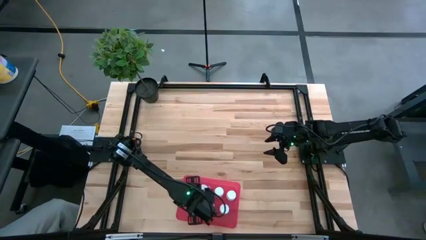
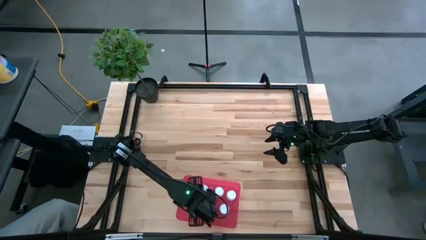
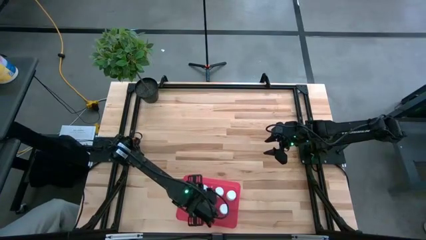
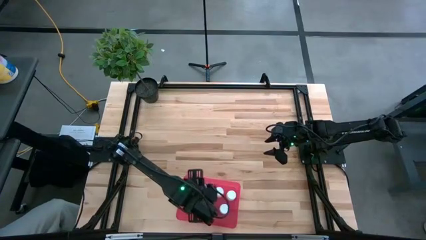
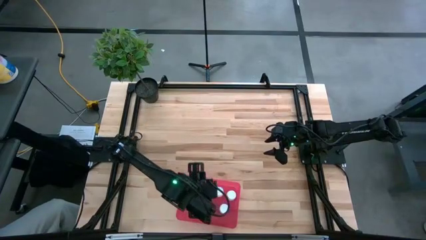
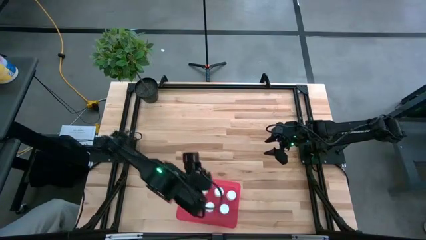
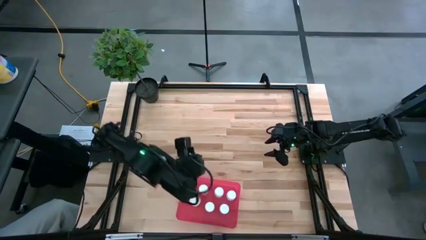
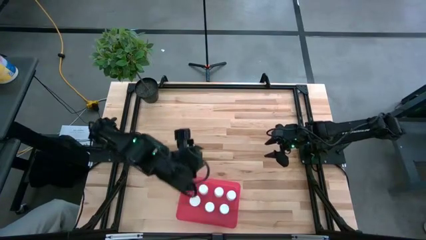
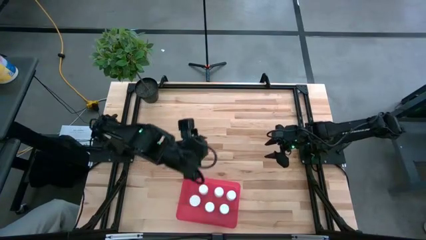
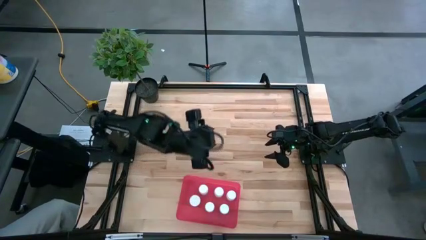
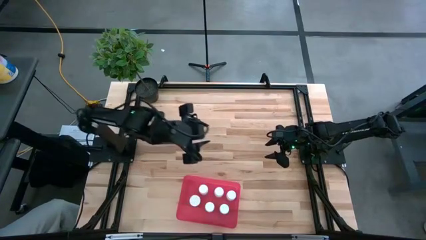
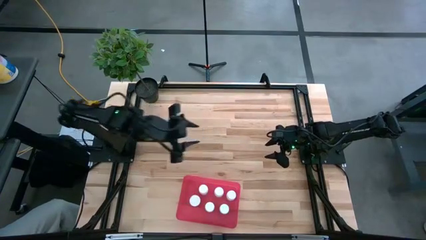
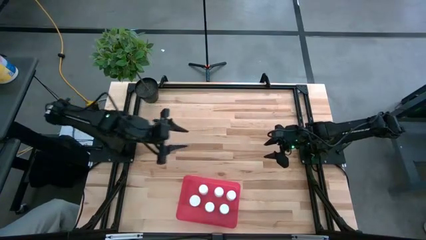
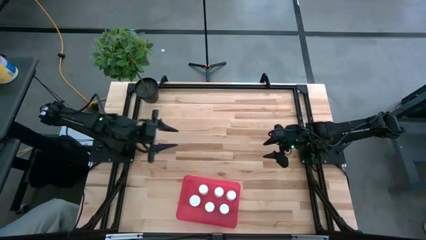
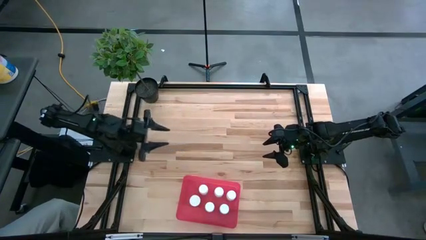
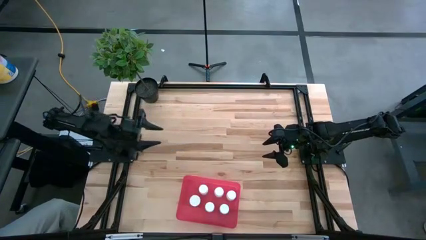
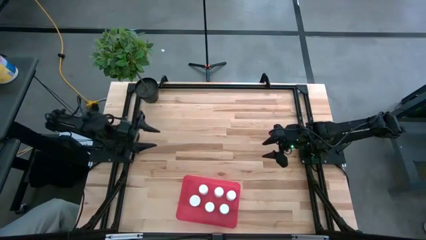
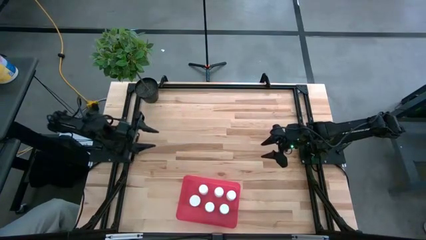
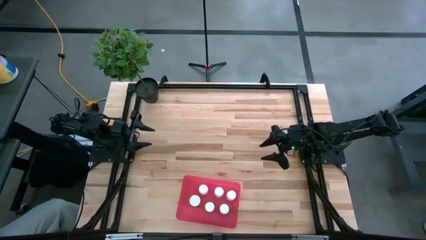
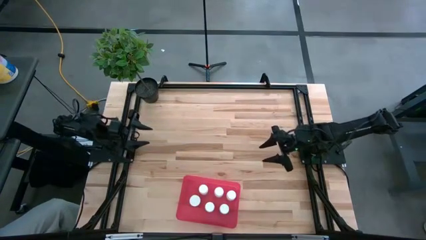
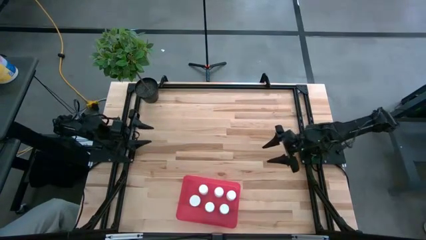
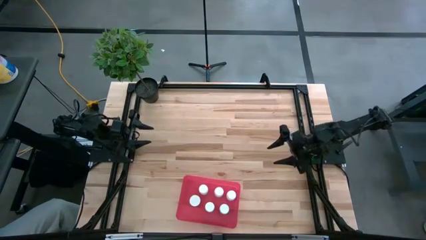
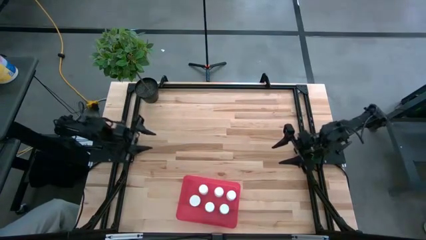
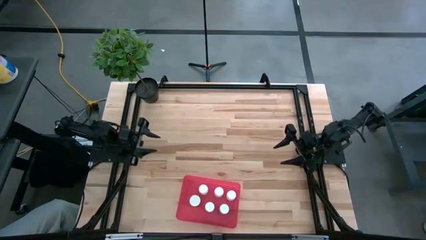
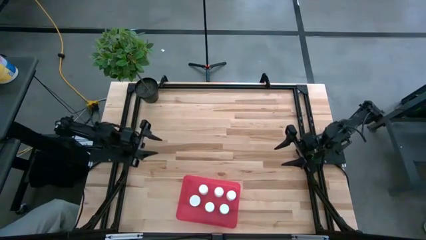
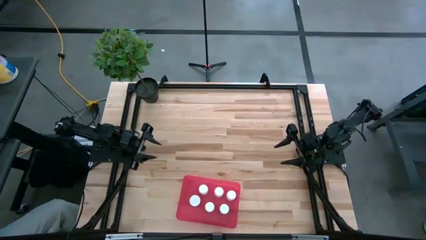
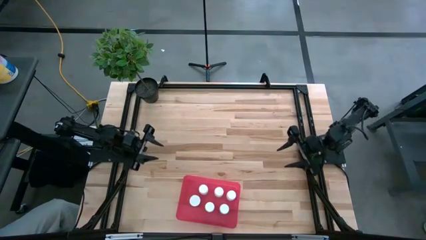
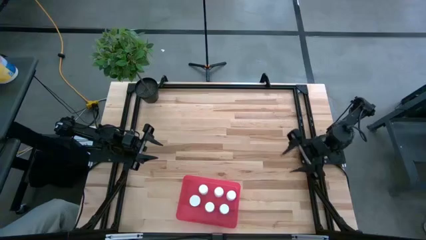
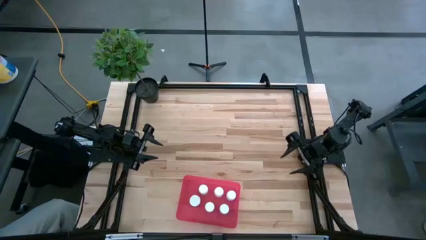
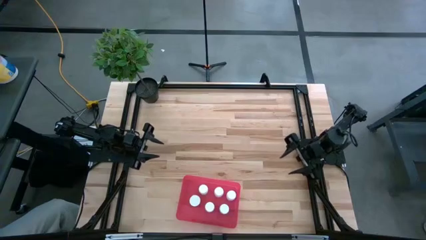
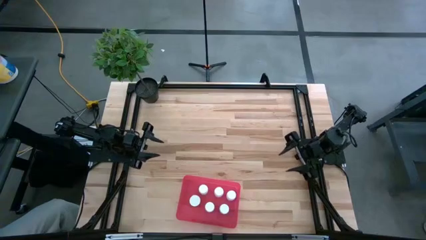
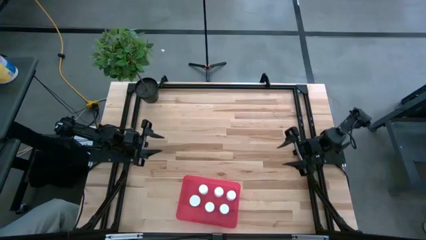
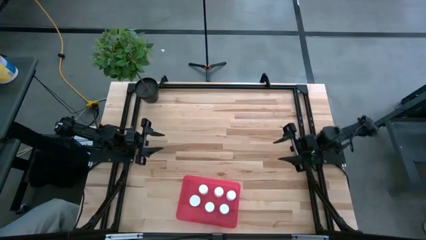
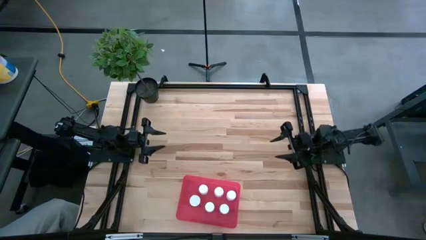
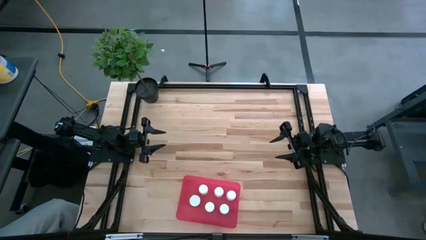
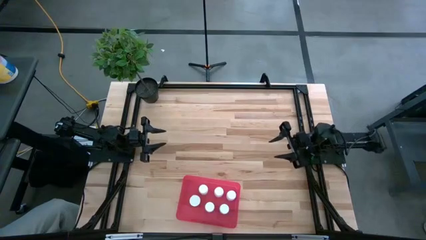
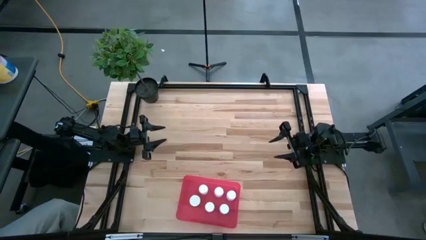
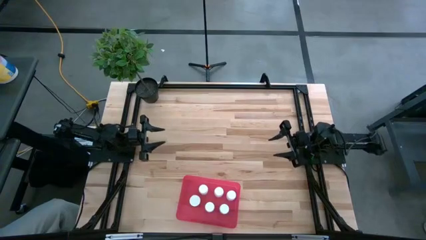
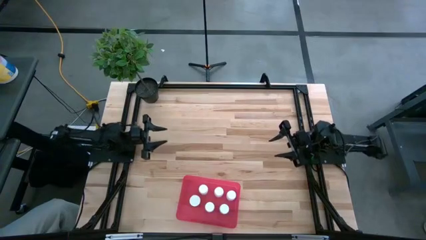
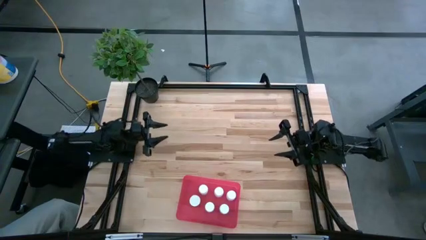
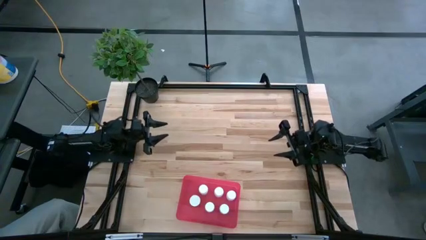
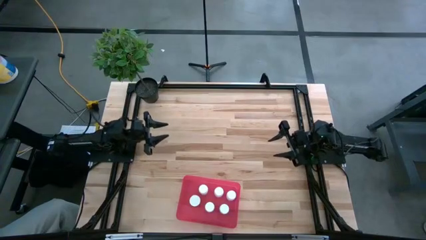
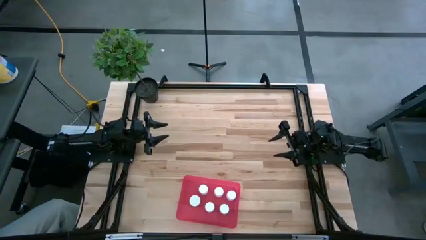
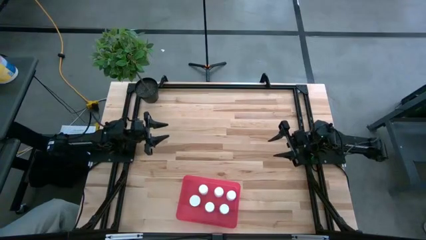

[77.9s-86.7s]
Task: Pick and place pill bottles into a basket
Return to Home Position

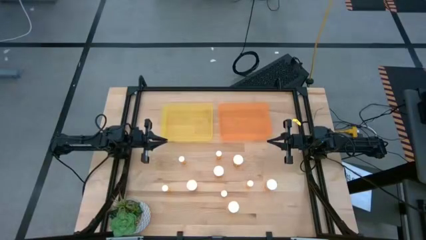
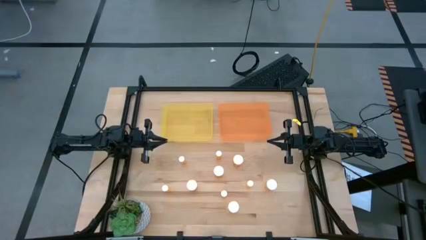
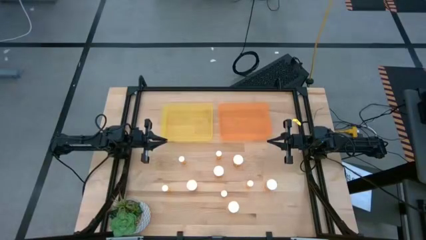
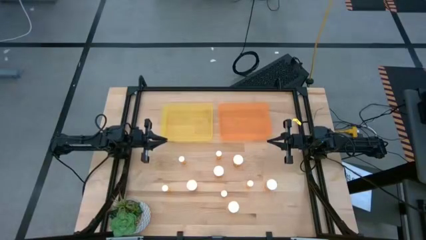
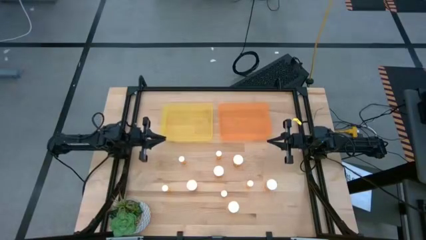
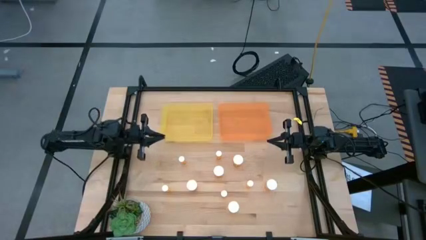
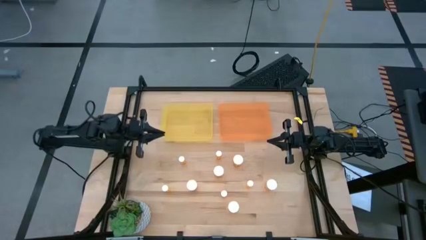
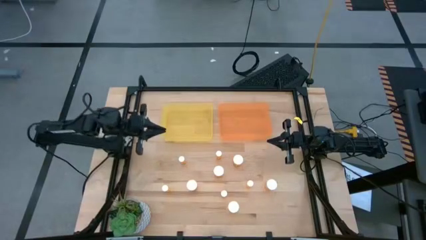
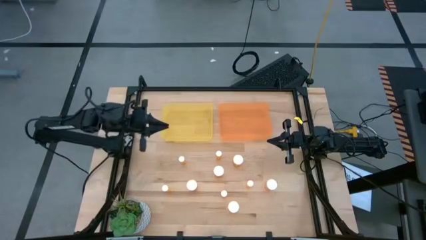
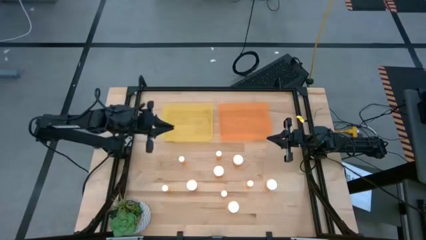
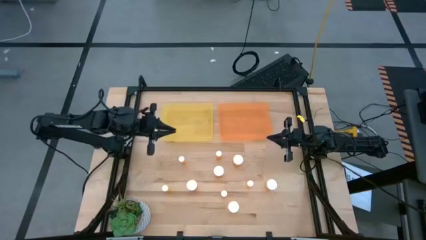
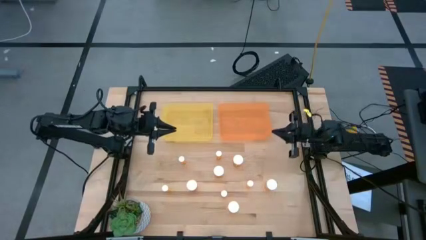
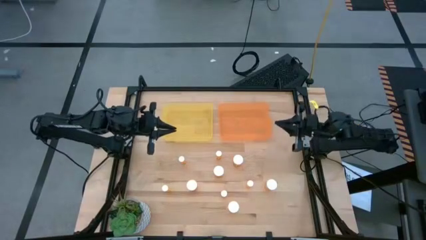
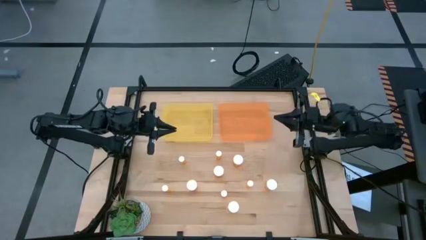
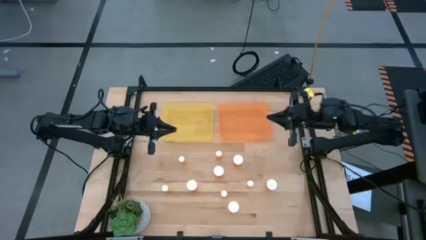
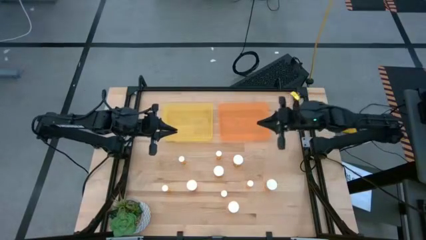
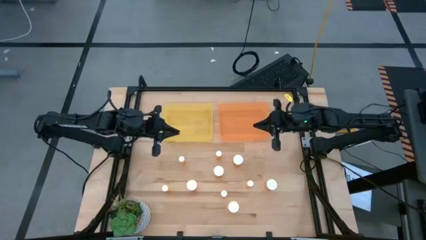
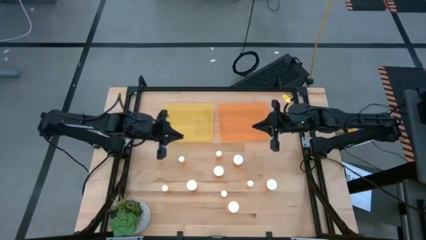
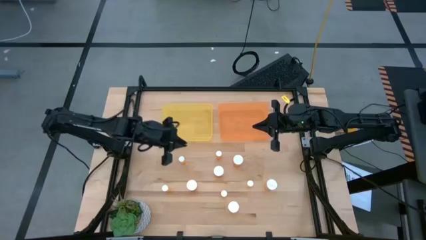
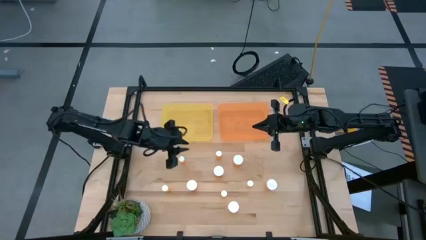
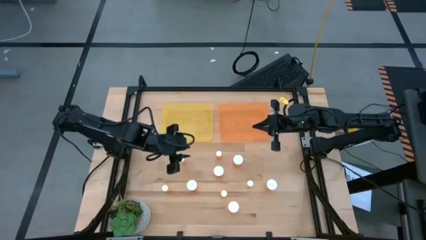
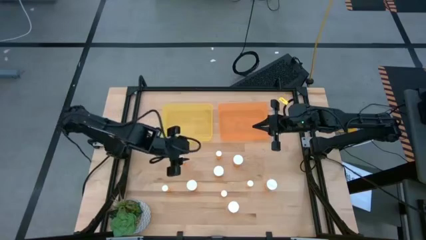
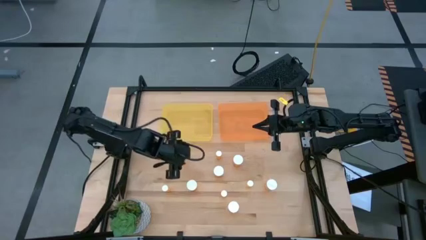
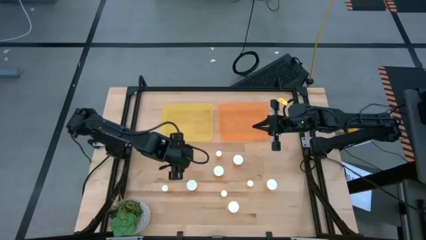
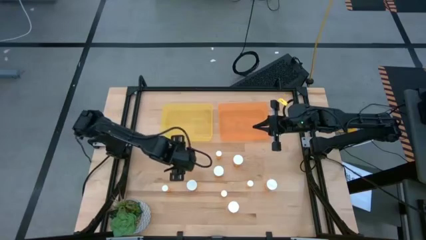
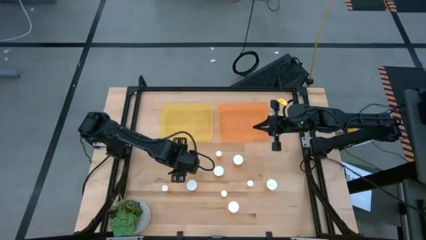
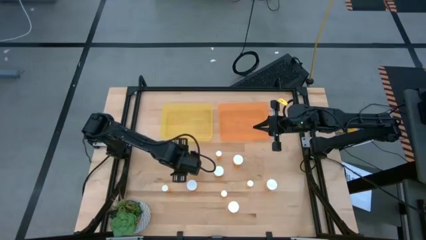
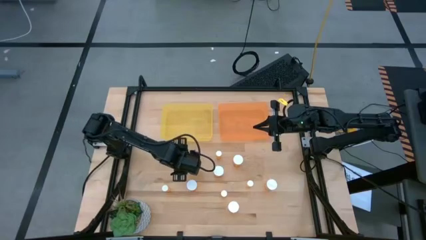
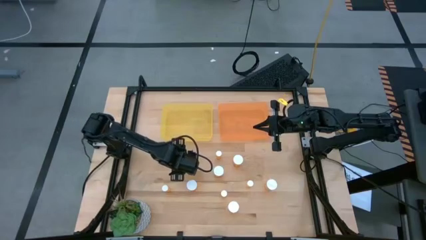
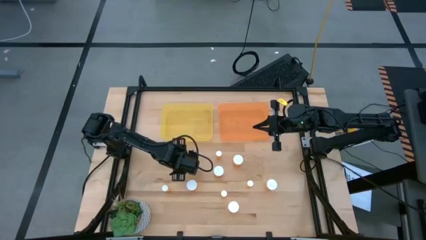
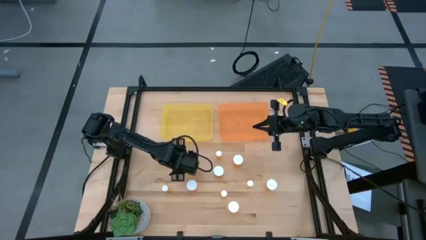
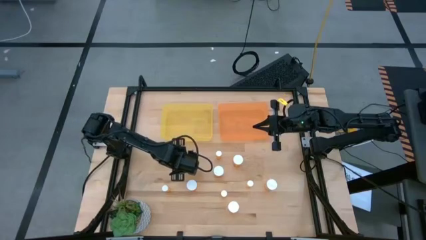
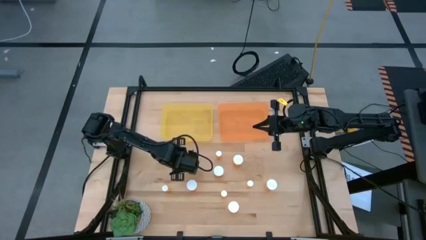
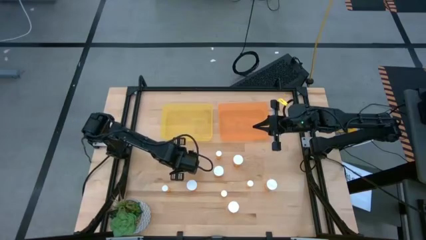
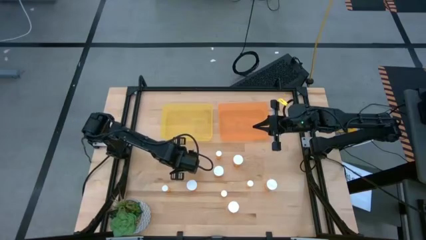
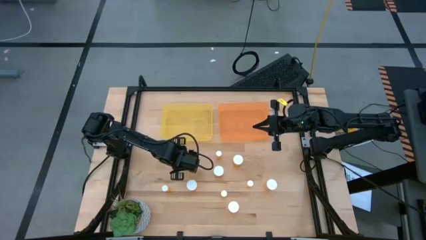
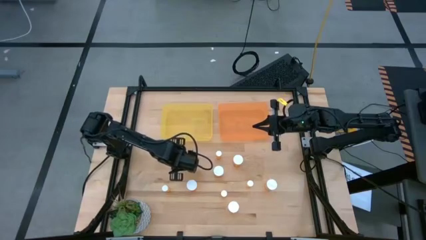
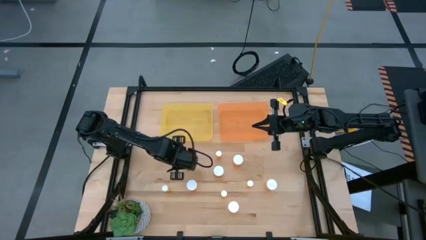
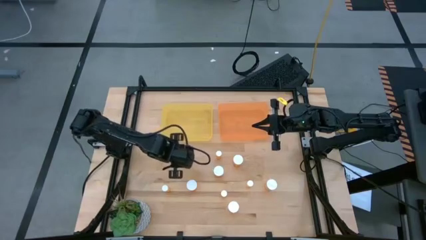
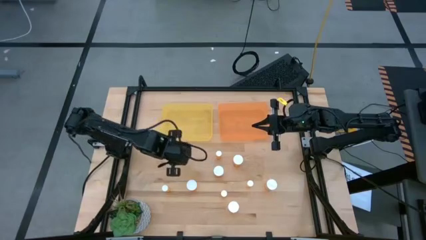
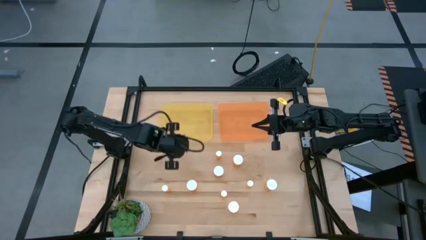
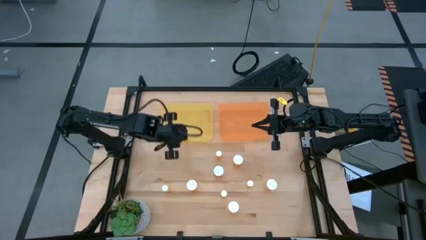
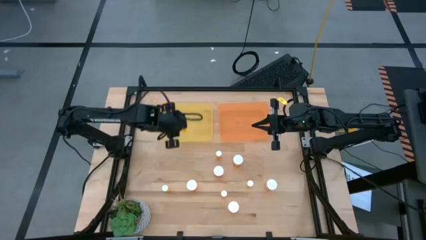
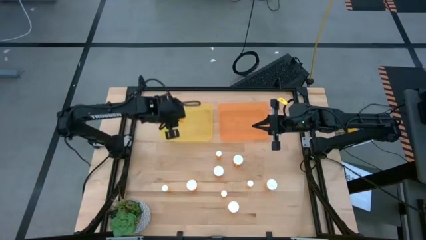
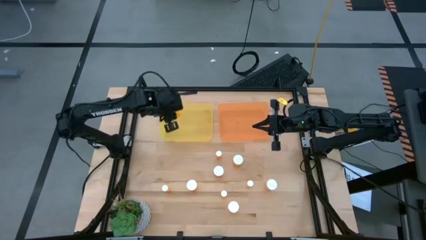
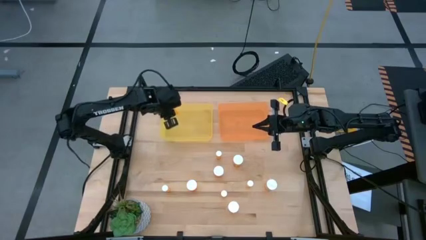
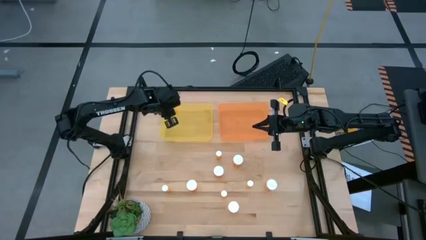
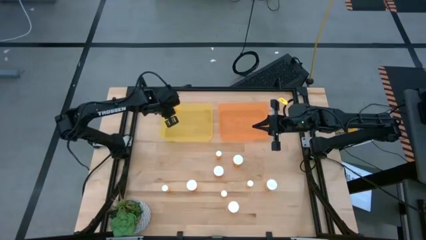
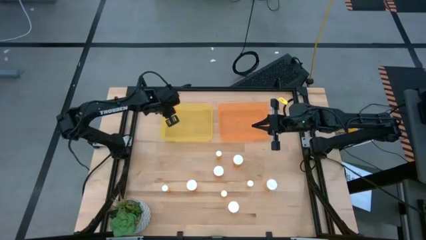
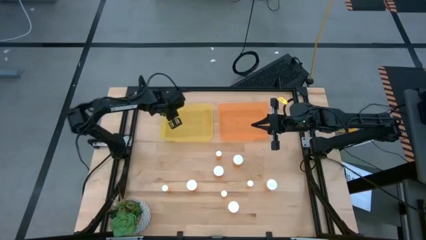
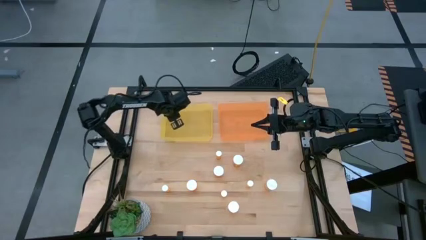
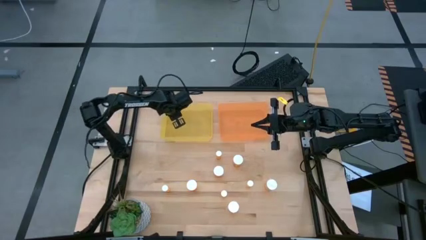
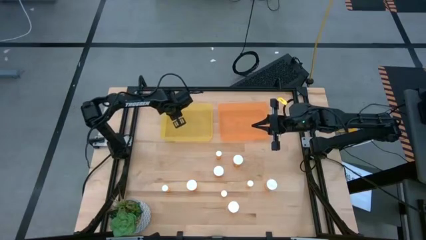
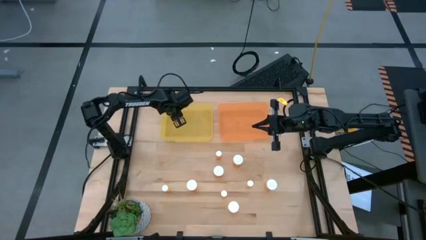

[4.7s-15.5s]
Task: Pick and place medicine bottles into bin by pill shape (circle, oval)
Put the small orange pill bottle into the yellow bin
